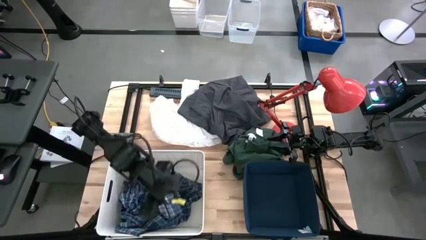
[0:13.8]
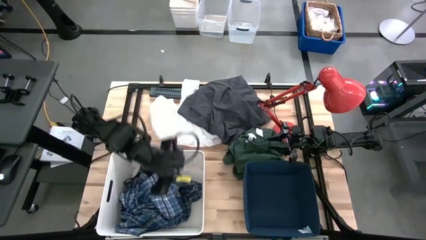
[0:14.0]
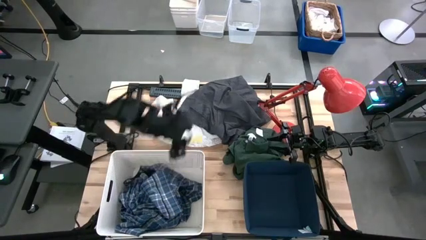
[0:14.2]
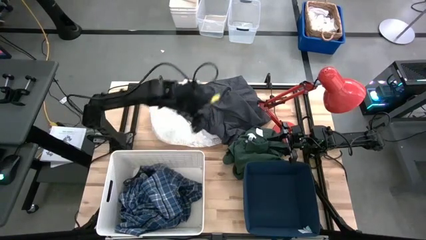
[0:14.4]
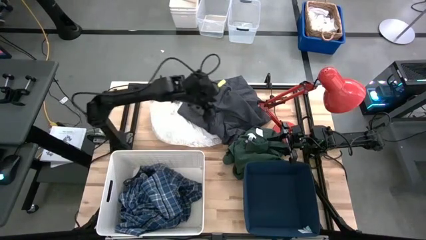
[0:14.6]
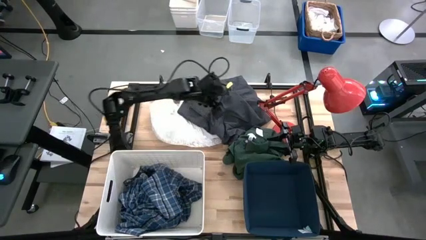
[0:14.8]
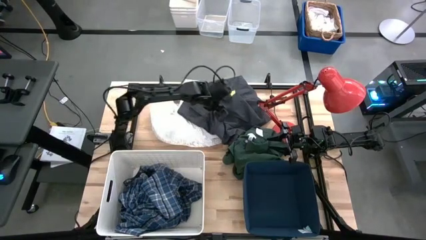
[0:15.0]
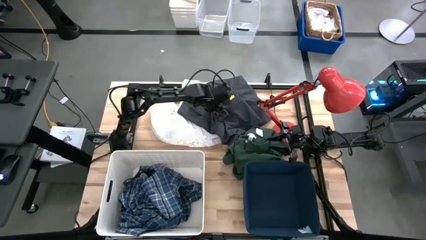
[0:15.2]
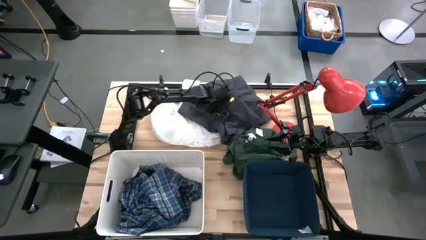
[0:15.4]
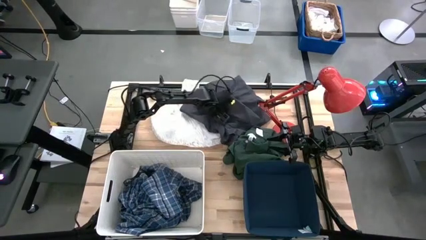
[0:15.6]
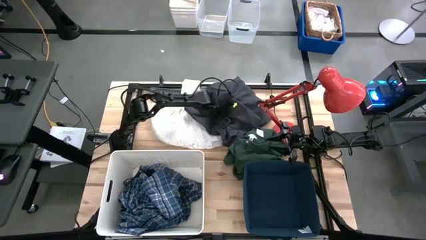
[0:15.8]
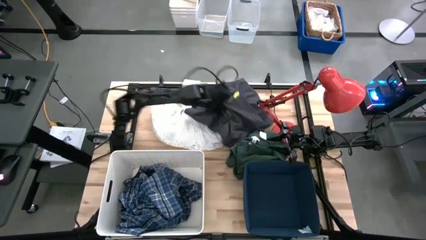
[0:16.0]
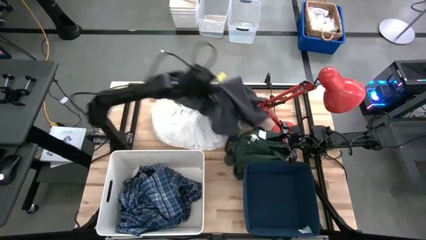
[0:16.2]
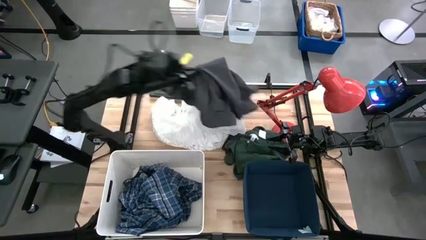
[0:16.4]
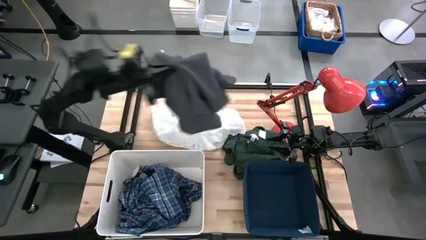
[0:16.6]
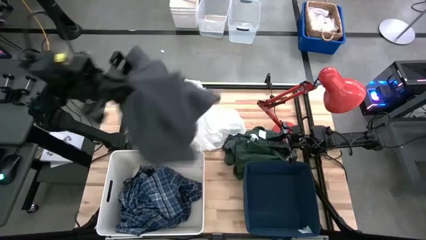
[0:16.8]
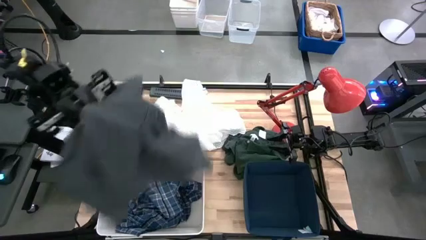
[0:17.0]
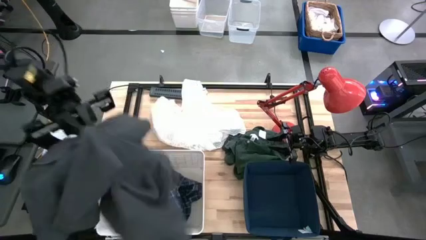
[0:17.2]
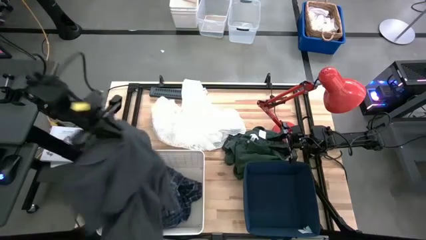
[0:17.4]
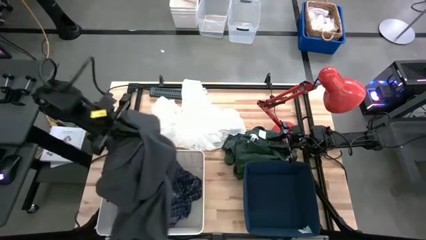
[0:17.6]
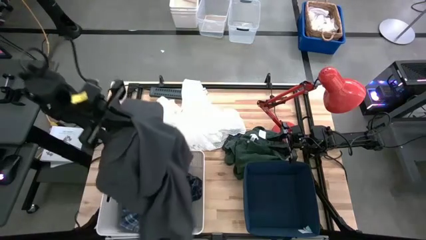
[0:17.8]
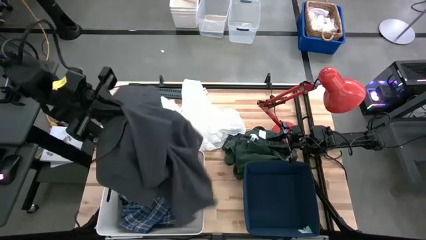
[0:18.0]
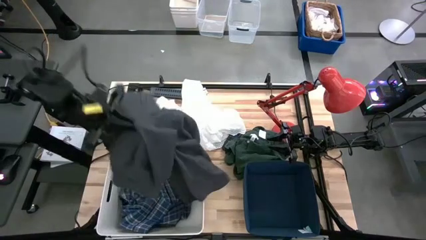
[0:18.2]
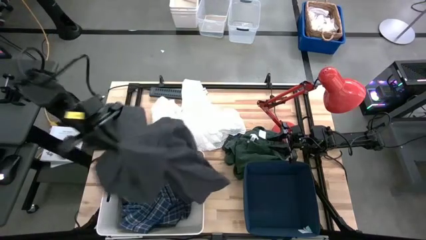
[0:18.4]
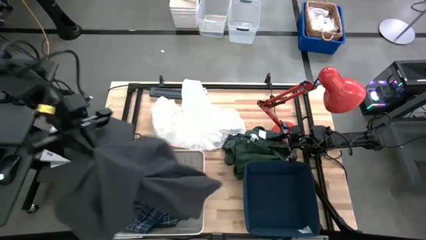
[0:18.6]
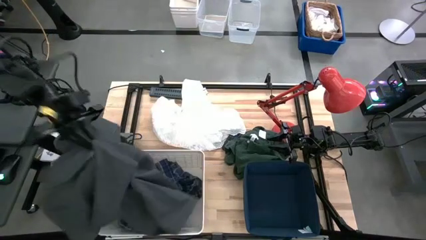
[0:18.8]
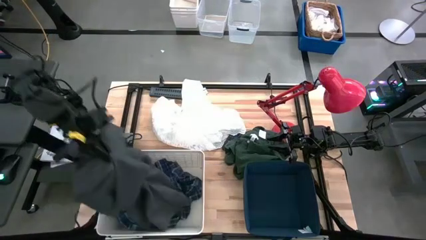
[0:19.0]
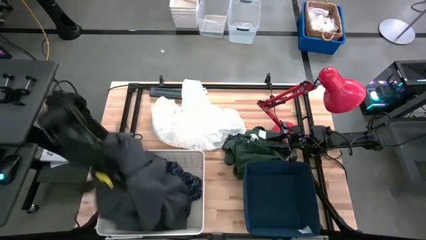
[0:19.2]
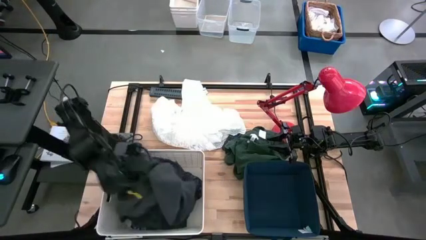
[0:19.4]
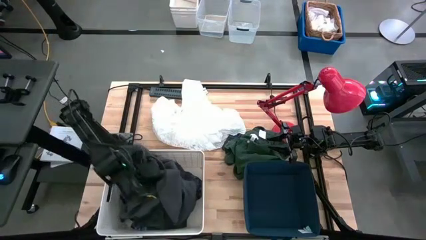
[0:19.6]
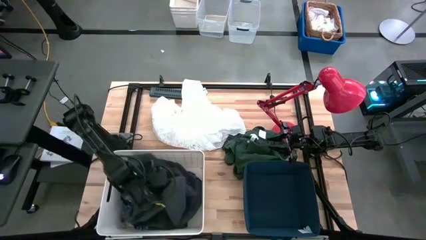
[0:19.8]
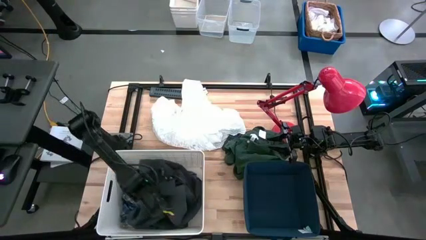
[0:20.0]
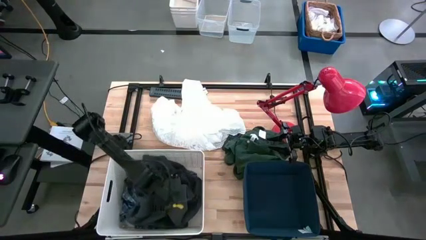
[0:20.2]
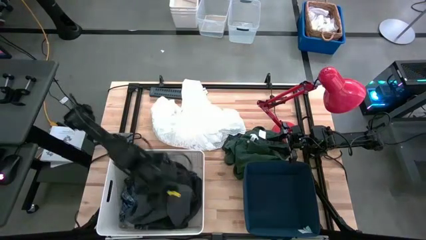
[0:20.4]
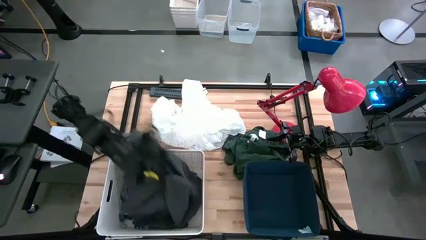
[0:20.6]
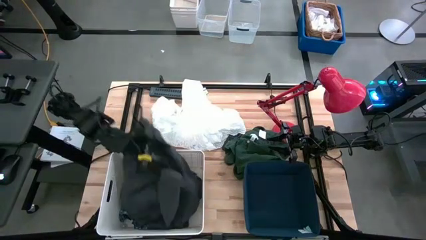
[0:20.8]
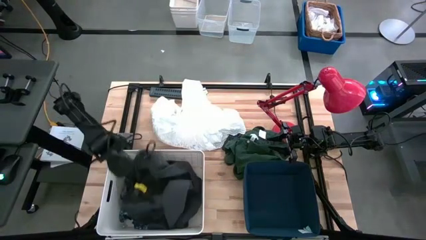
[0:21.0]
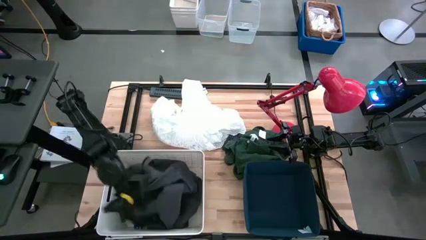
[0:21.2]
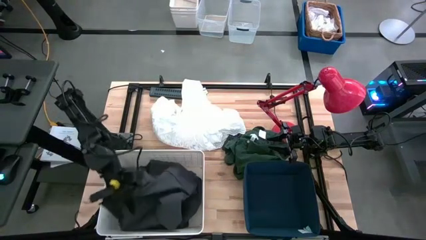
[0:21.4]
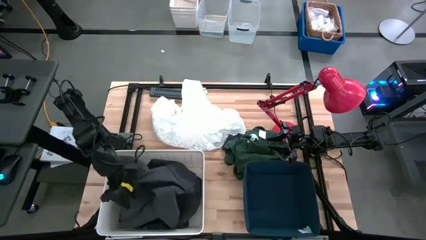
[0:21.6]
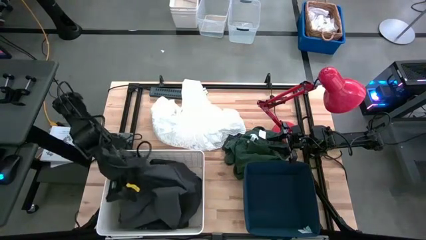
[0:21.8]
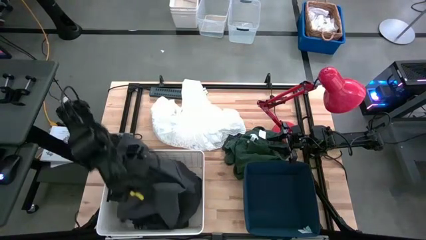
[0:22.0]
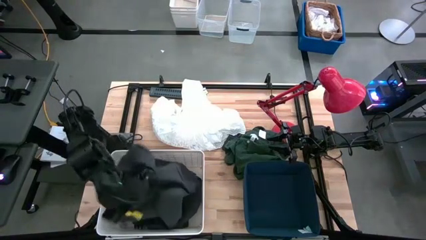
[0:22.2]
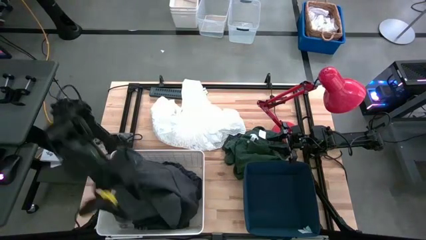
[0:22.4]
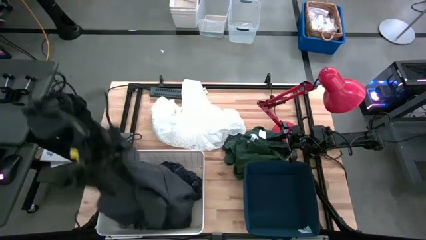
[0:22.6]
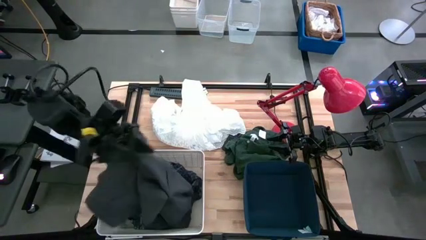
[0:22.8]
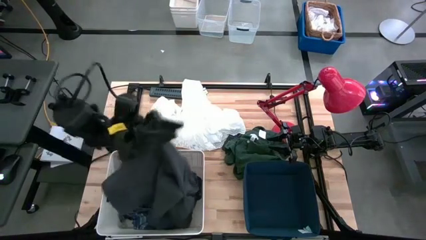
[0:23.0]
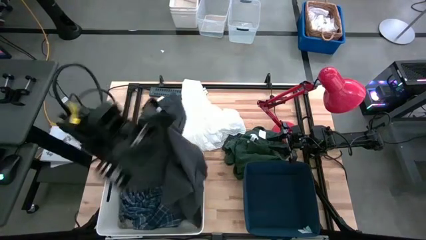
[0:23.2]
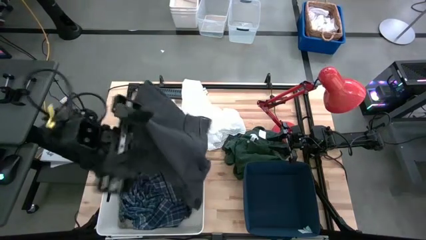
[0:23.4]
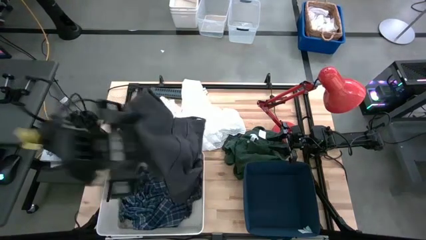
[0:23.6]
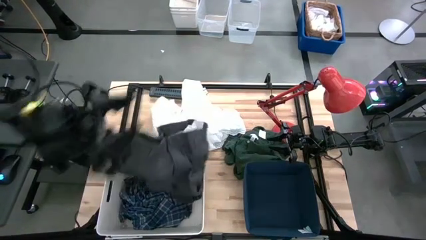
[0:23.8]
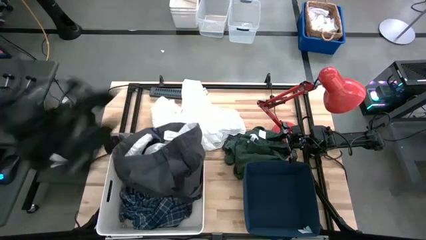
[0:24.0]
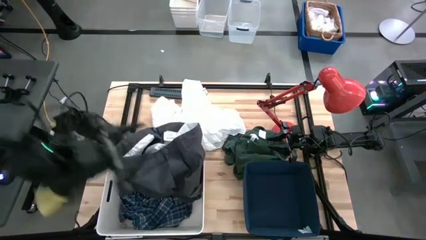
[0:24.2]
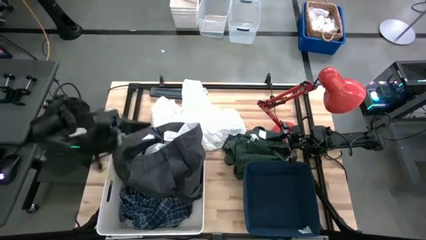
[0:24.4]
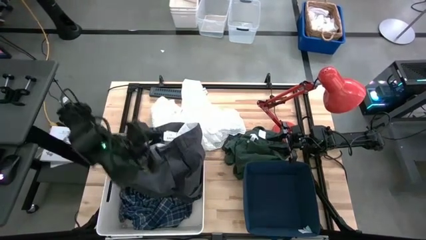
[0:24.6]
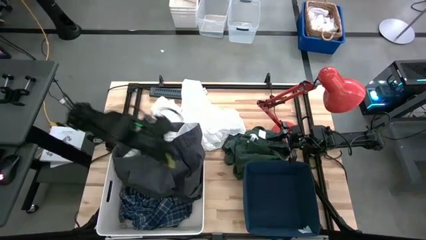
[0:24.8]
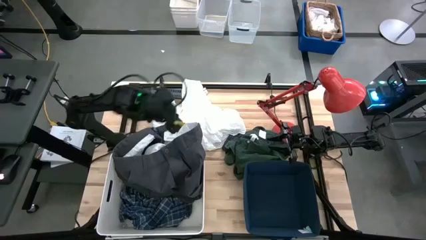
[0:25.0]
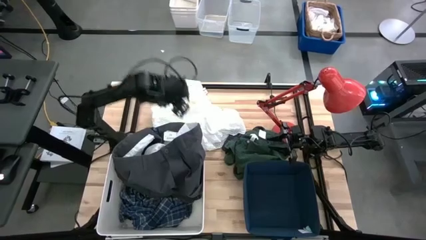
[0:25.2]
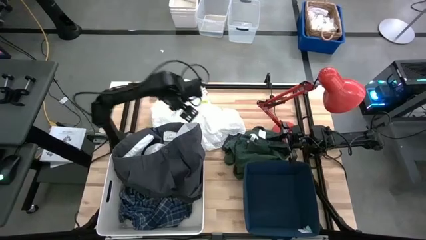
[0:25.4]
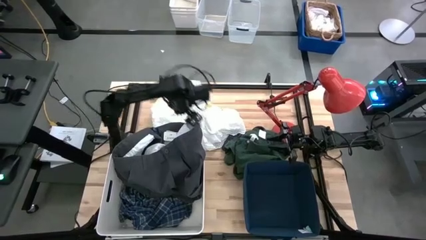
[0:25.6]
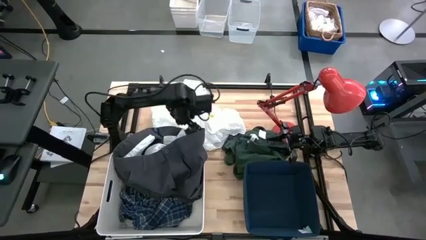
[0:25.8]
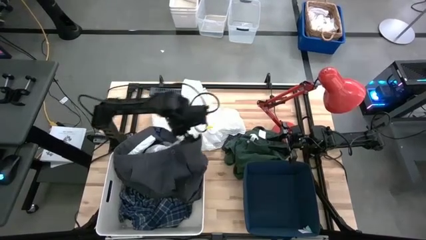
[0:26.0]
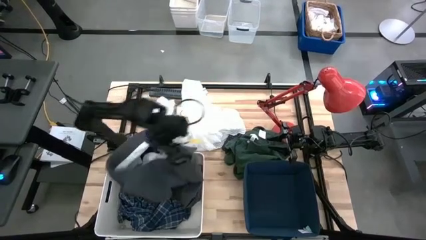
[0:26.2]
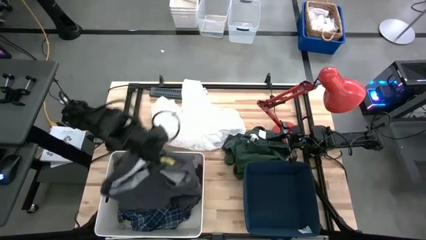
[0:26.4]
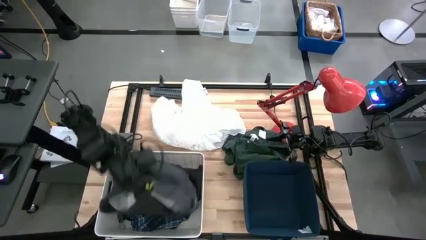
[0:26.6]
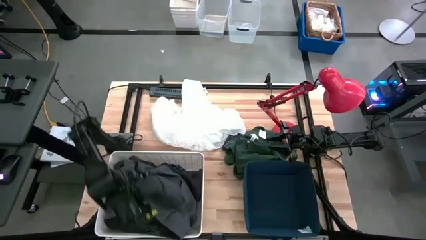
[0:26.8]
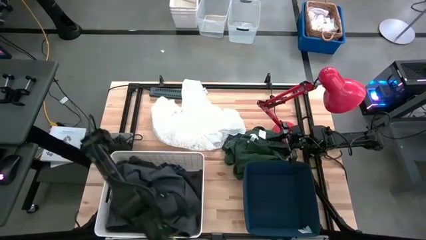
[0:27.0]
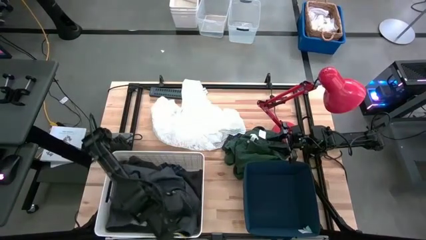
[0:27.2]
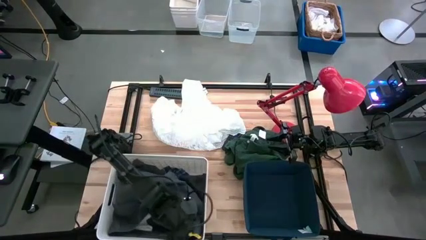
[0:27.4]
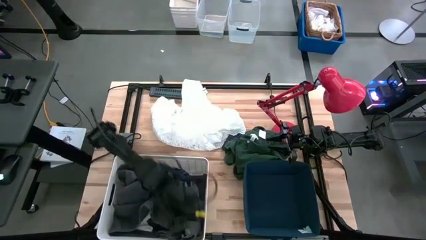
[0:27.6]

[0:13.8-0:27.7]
Task: Sort clothes
Put the gray pants into the white bin

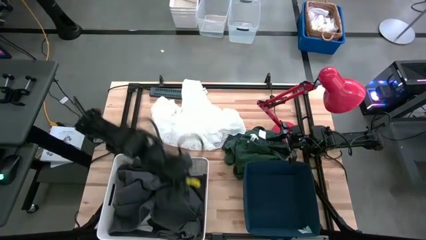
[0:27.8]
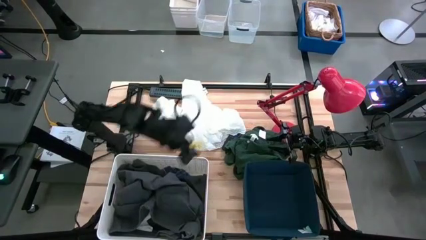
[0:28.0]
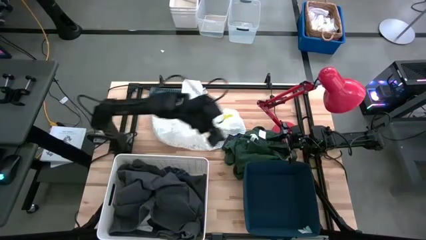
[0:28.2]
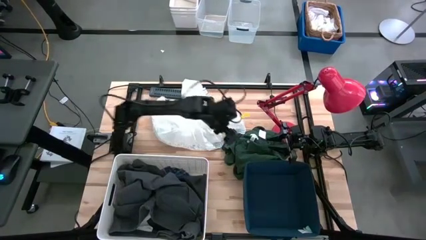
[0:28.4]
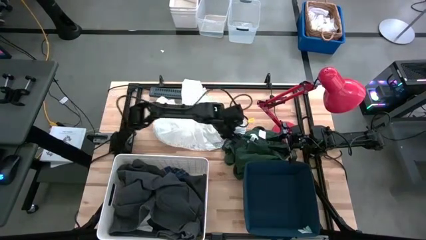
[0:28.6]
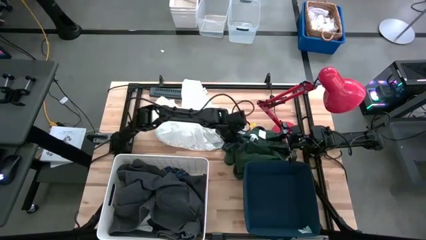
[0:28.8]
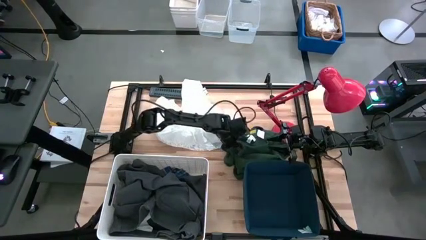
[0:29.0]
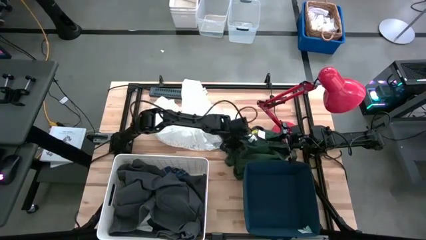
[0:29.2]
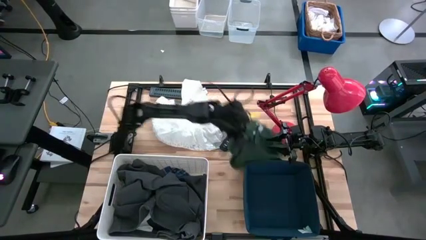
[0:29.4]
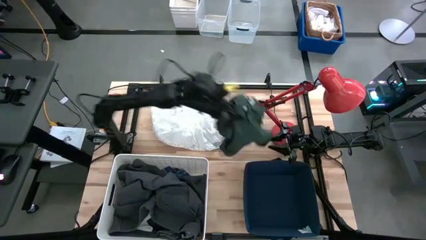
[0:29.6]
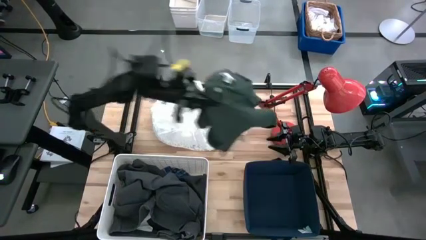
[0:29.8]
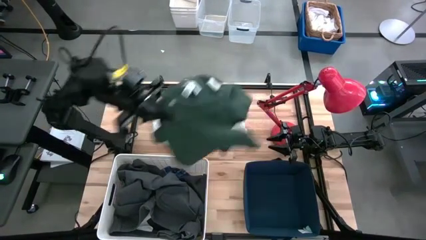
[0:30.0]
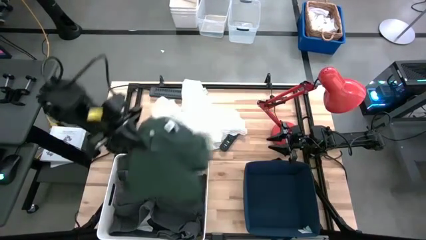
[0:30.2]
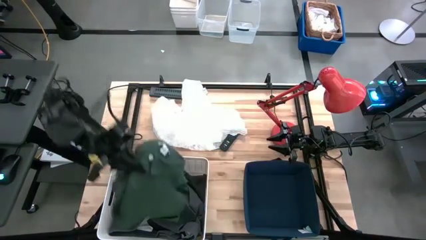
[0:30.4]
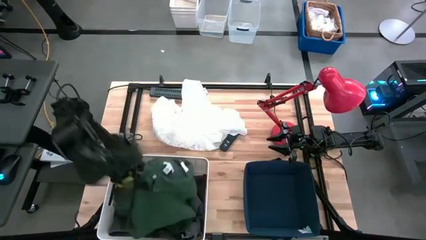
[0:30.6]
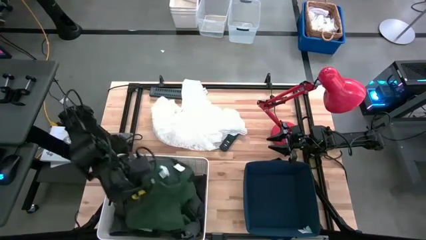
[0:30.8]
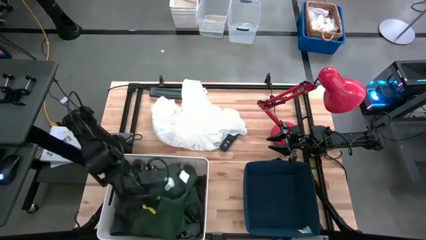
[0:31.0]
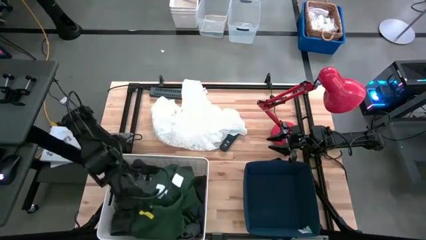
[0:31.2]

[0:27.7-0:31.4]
Put the green shirt into the white bin
